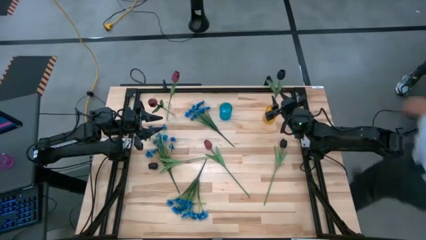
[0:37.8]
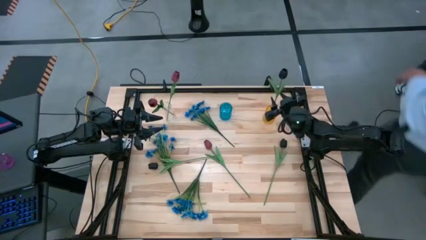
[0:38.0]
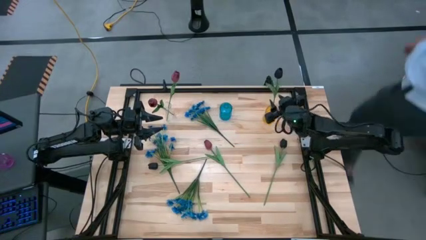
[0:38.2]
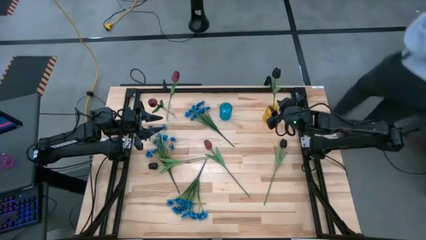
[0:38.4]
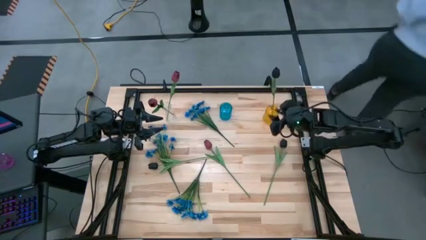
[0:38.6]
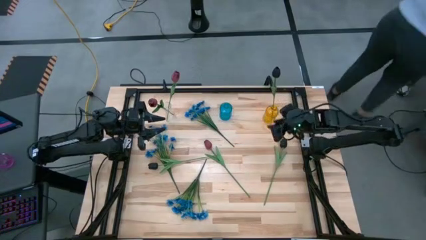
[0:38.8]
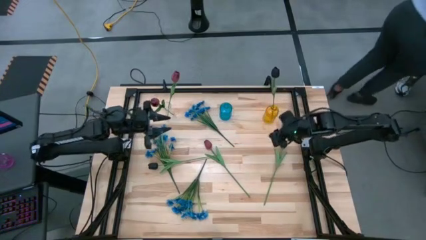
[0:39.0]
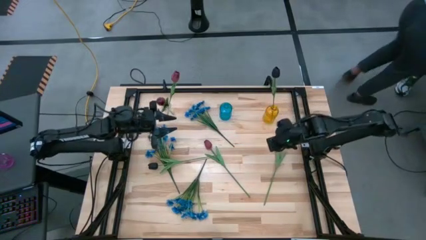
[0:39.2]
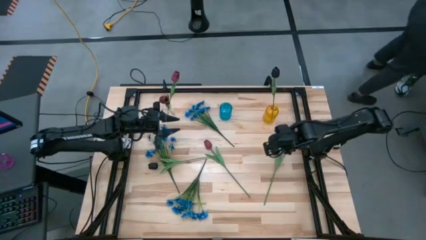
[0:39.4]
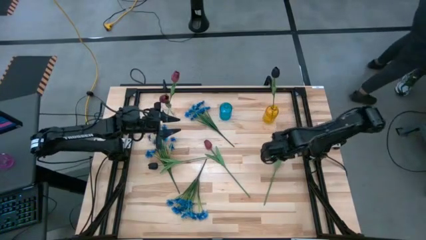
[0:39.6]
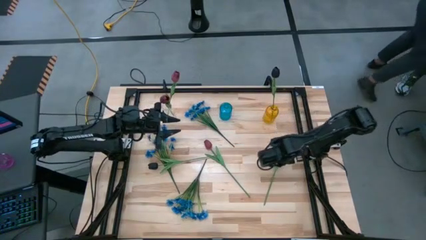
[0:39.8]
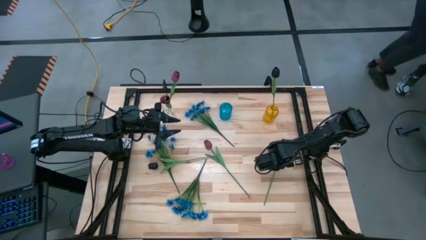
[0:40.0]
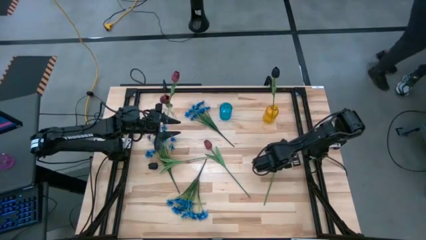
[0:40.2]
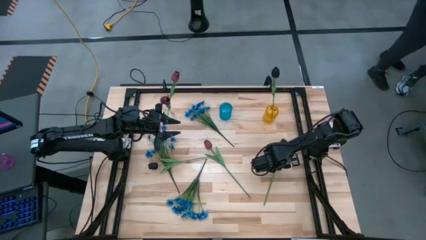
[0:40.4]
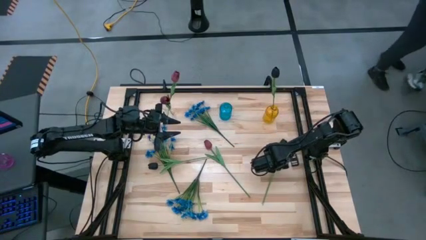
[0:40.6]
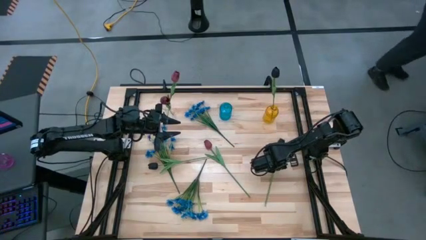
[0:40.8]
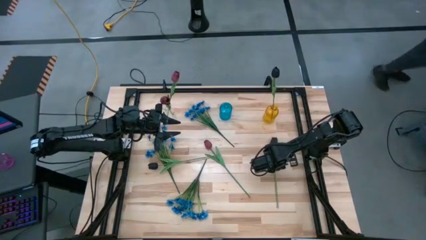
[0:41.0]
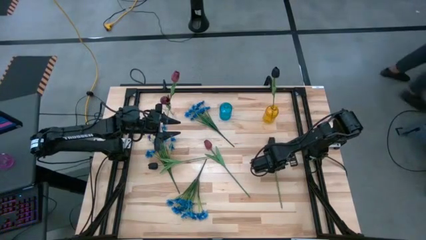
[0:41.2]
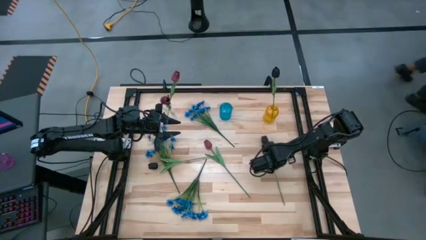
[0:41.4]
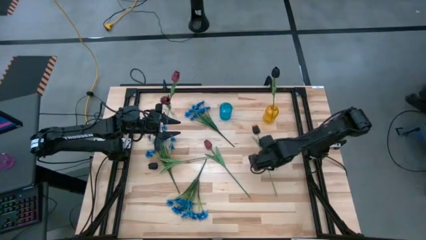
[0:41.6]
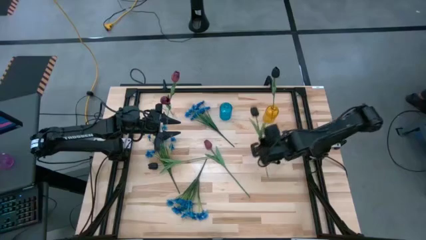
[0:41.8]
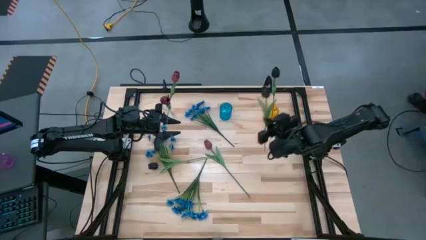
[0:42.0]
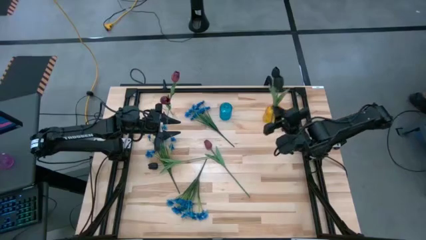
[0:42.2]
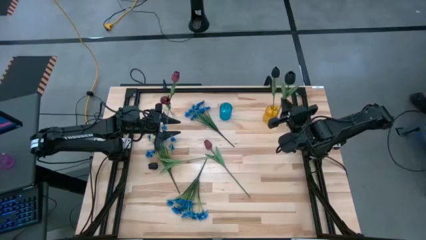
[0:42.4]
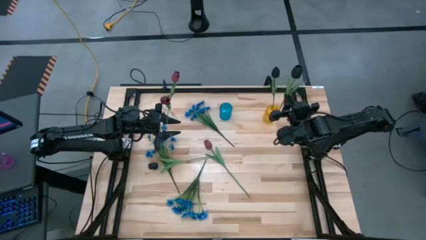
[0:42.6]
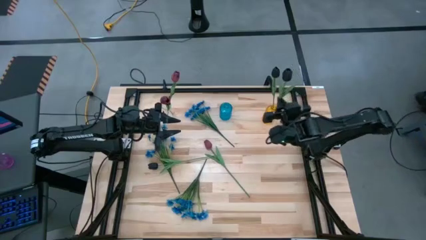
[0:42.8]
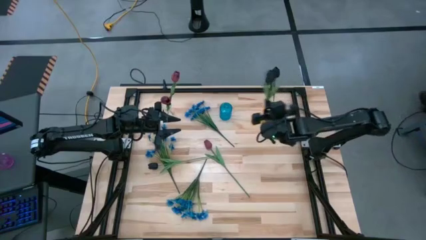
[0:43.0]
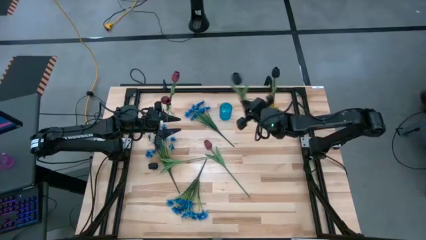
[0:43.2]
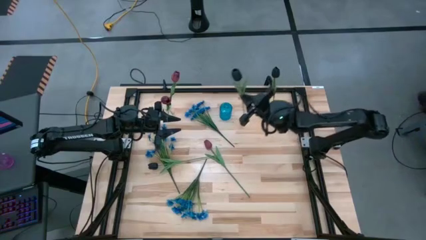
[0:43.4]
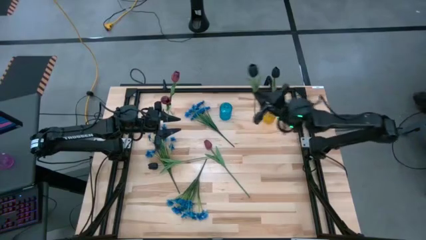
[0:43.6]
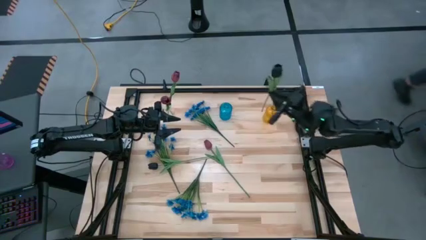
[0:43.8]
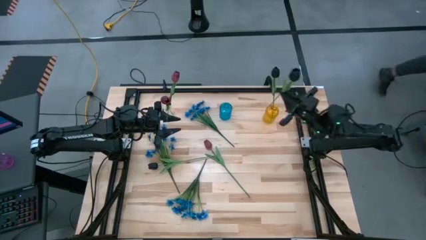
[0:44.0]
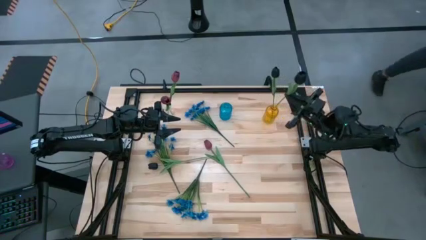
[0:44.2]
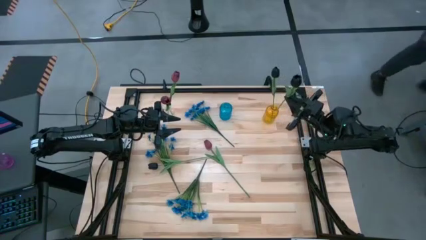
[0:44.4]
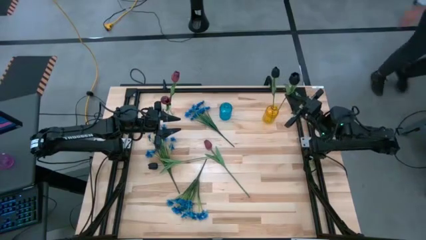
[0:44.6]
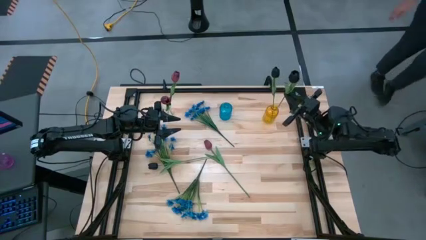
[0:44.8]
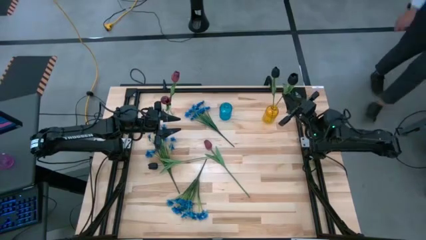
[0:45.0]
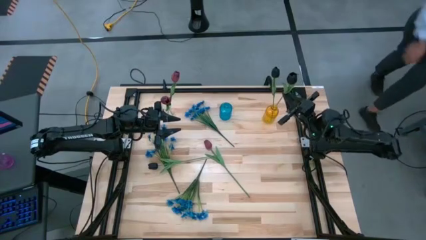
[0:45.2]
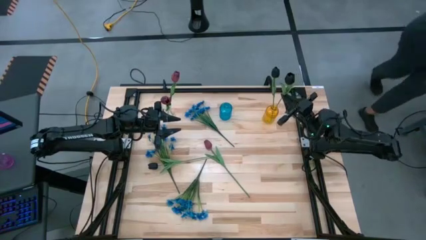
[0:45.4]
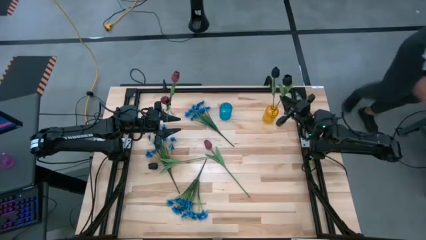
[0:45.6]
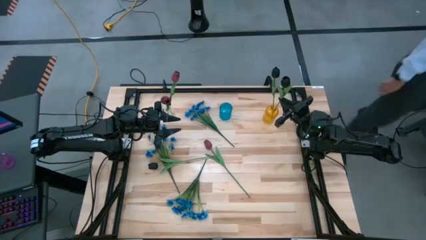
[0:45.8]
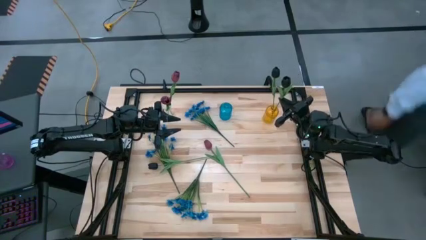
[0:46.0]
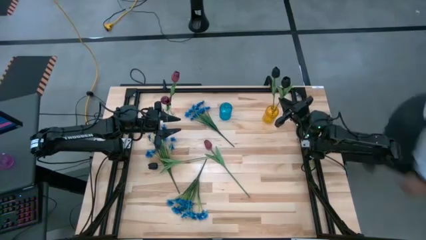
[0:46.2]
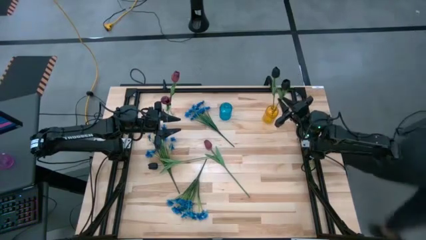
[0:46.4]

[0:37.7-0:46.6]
Task: Sort flowers into vase by color
Put the right black flower into the yellow vase

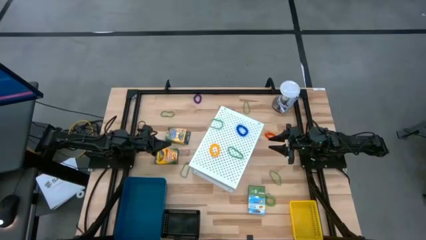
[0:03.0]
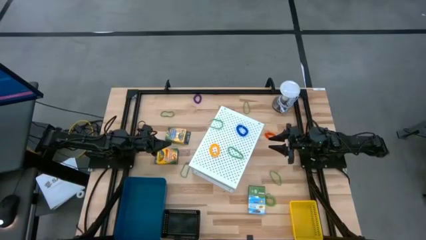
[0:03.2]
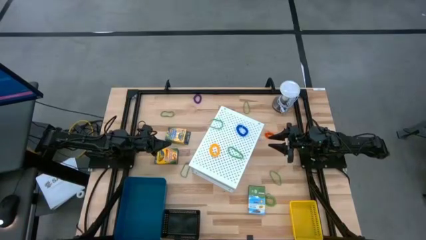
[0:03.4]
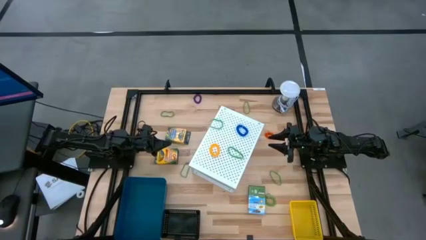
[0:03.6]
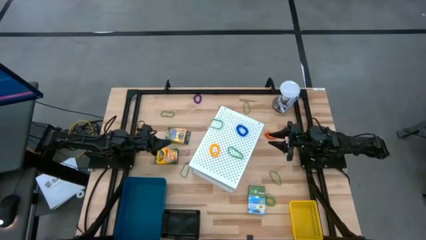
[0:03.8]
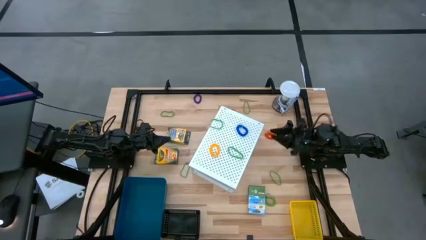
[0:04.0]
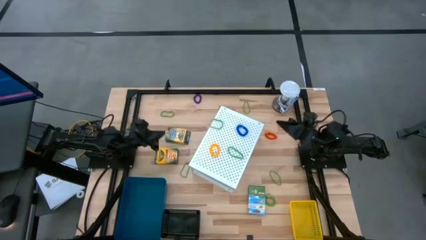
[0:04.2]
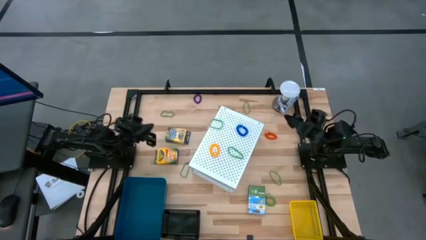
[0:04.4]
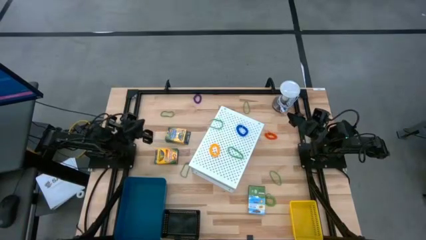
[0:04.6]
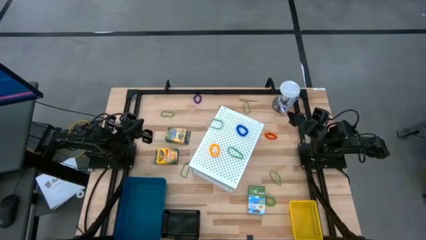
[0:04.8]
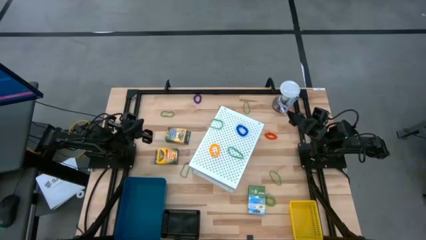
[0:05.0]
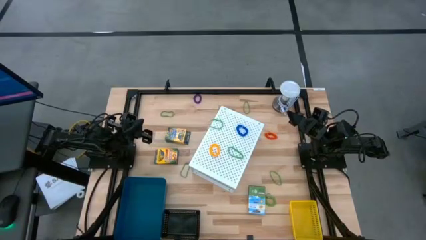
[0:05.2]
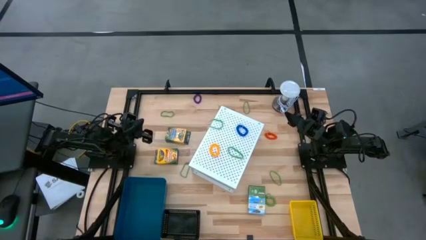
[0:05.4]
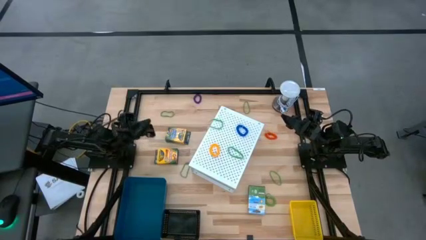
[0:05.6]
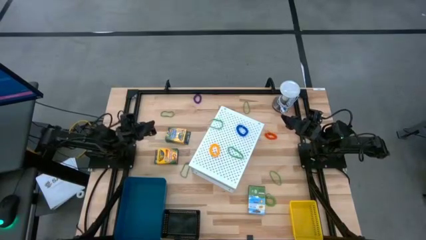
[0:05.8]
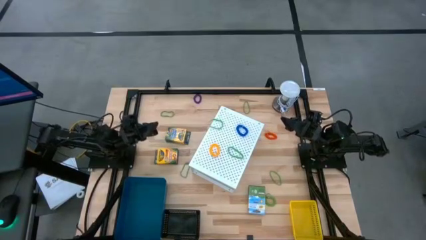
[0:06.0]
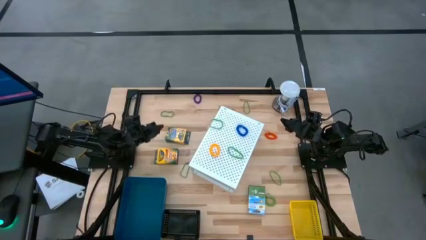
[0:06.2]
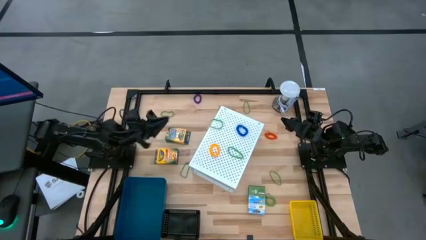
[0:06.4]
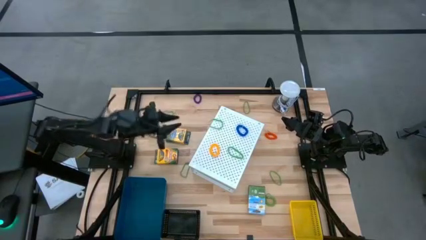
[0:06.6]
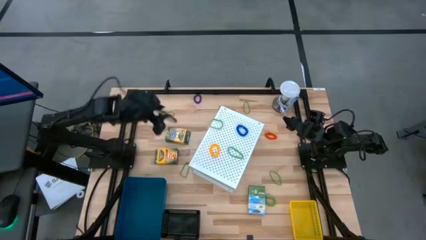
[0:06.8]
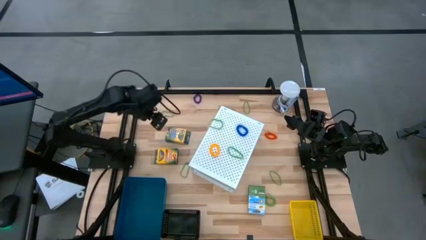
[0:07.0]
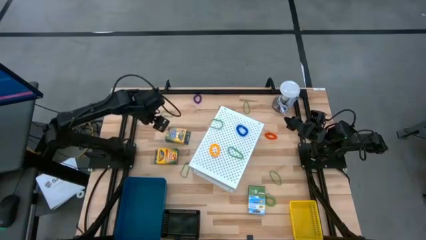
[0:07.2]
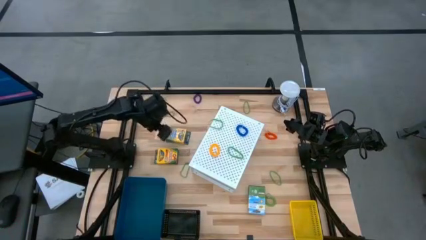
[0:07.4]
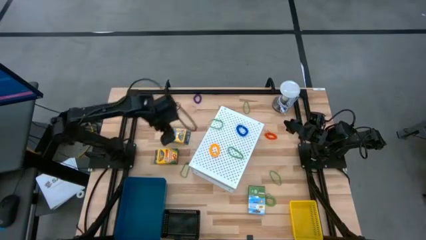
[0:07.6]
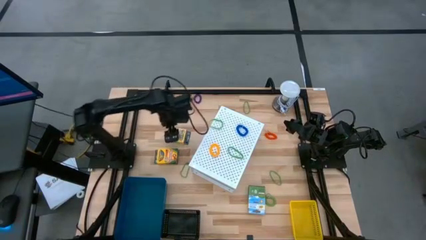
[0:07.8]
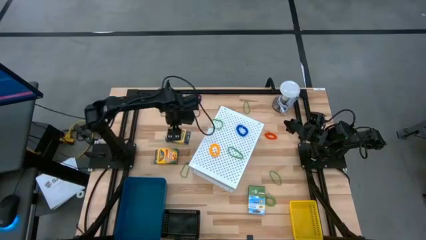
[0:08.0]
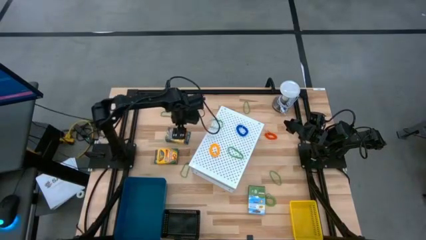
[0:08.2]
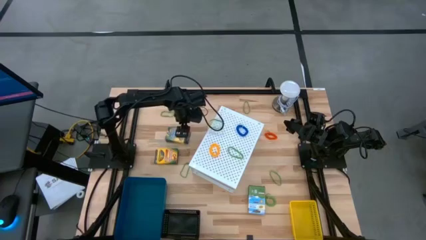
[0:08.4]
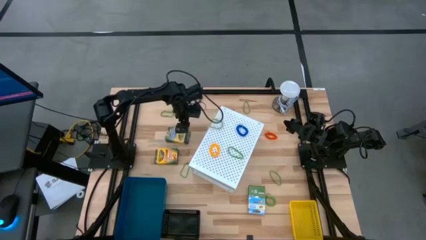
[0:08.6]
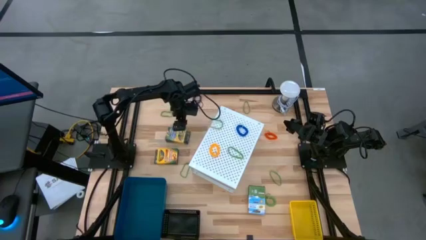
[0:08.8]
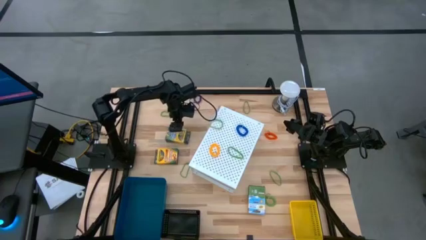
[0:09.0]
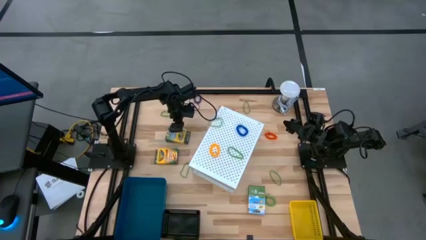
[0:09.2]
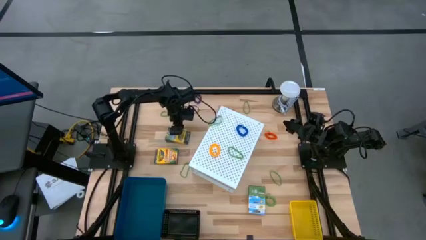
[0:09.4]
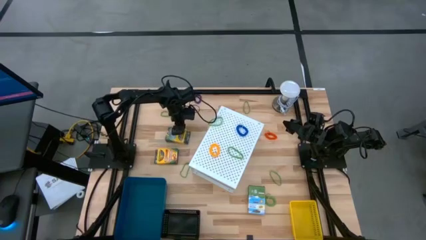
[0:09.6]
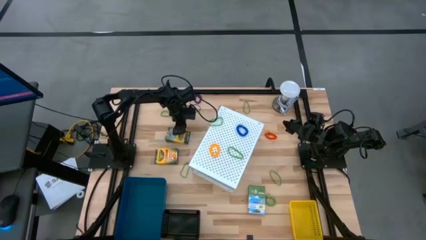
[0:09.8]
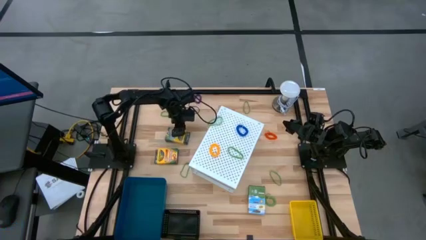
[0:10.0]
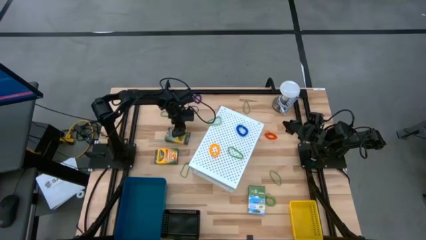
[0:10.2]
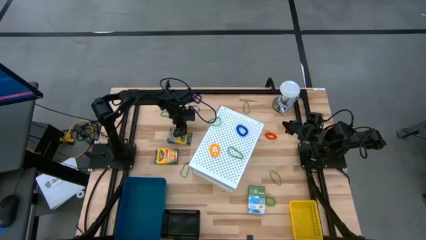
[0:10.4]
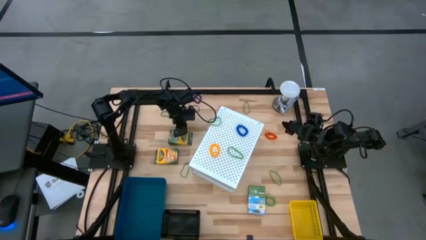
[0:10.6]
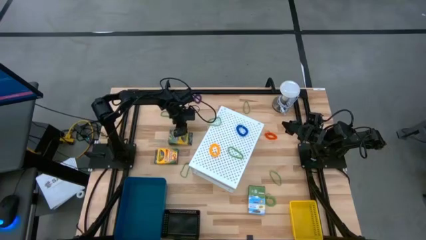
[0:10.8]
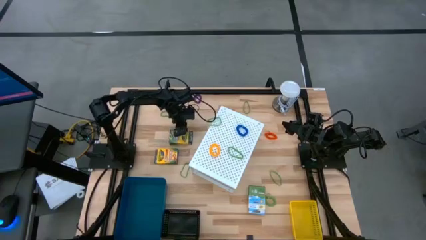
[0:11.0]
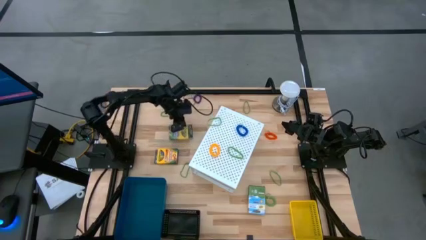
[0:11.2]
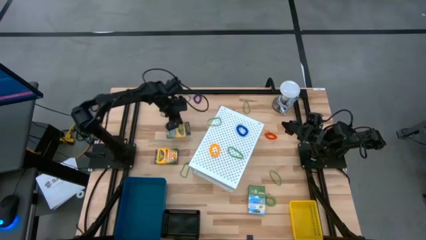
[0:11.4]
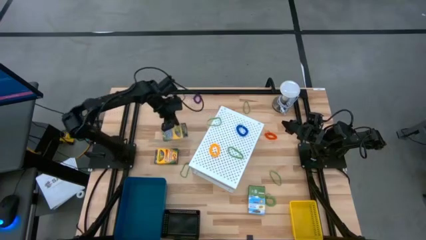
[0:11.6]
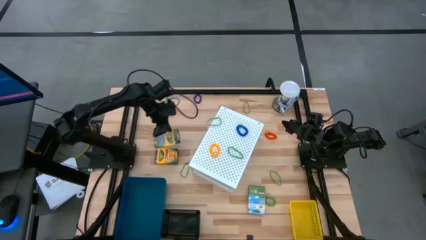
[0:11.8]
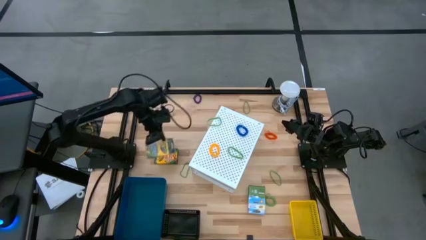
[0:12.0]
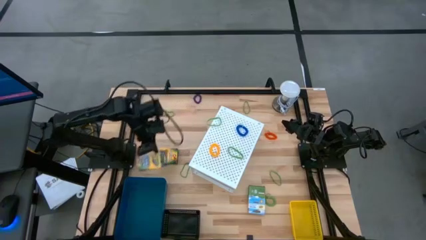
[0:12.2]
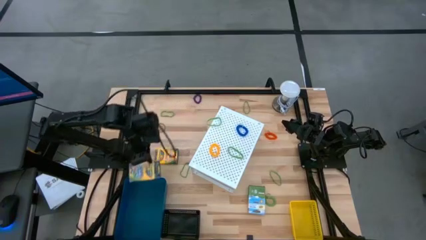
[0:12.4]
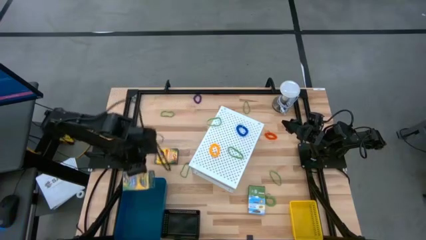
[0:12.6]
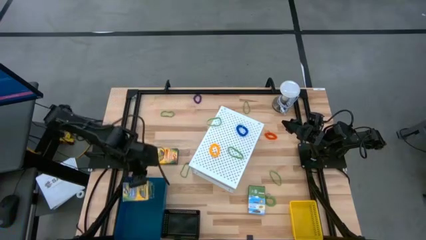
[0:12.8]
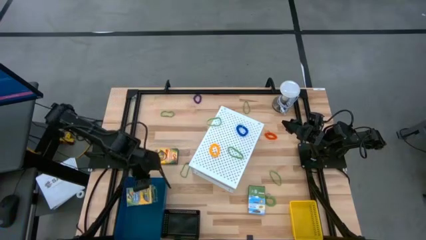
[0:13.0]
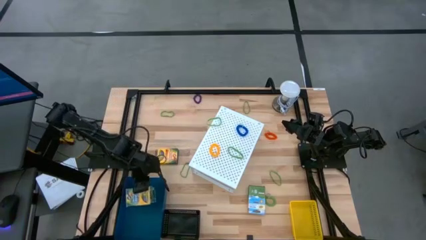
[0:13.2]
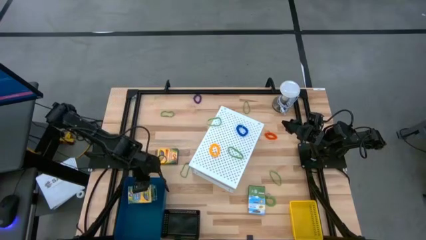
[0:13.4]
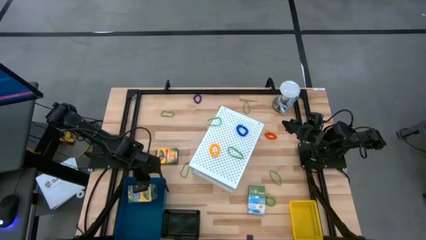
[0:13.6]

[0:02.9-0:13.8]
Task: Pick & Place Office Desk Supplies
Put the yellow crayon box into the blue bin
